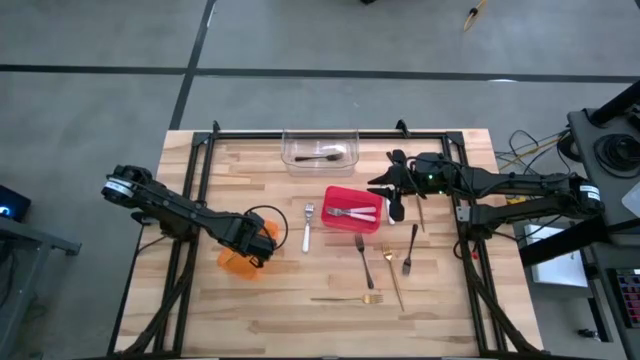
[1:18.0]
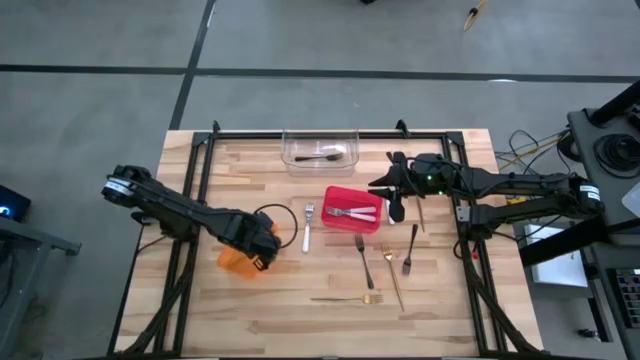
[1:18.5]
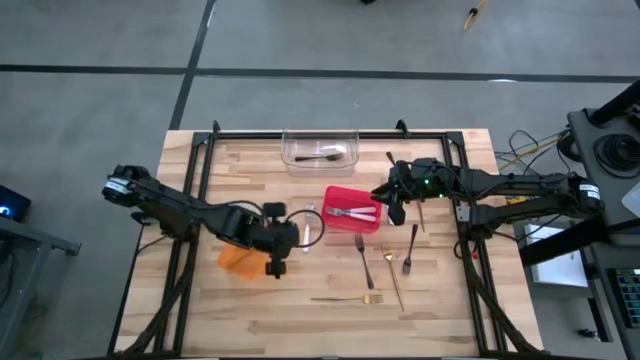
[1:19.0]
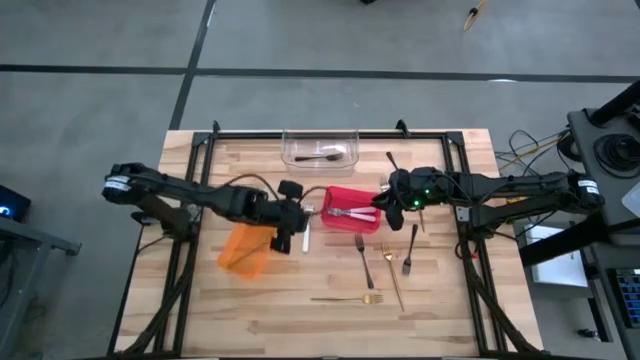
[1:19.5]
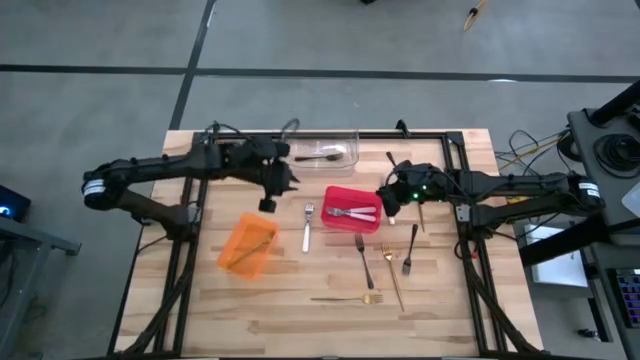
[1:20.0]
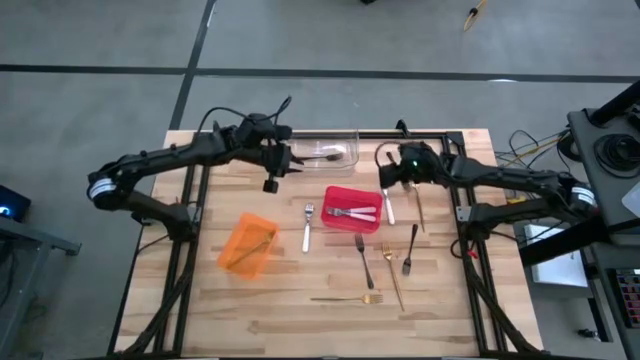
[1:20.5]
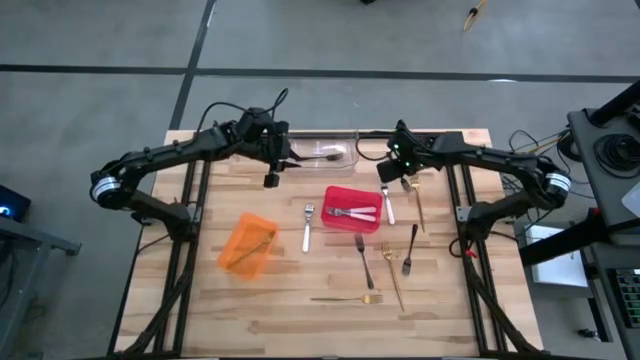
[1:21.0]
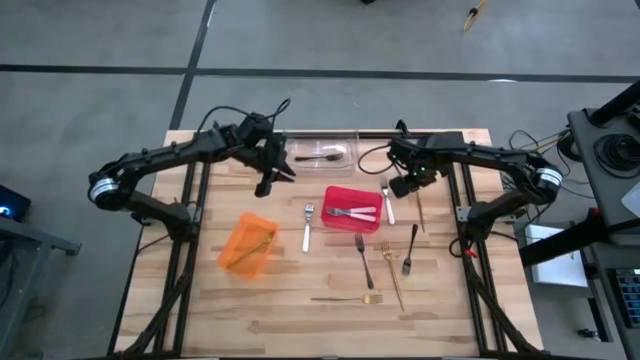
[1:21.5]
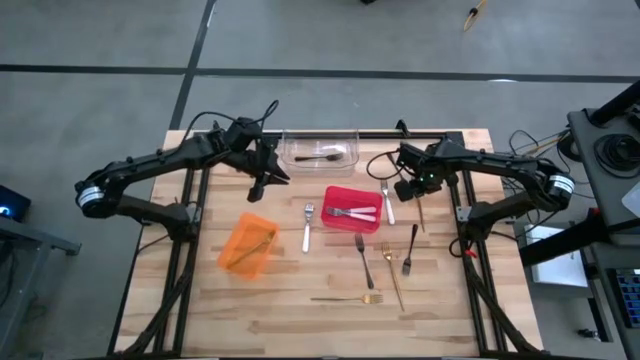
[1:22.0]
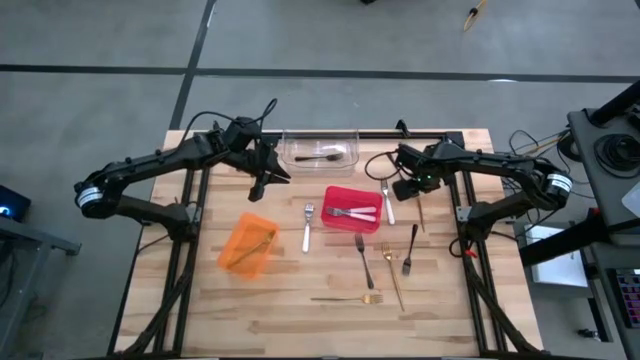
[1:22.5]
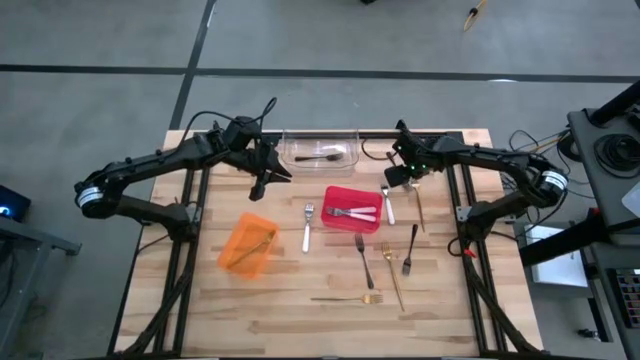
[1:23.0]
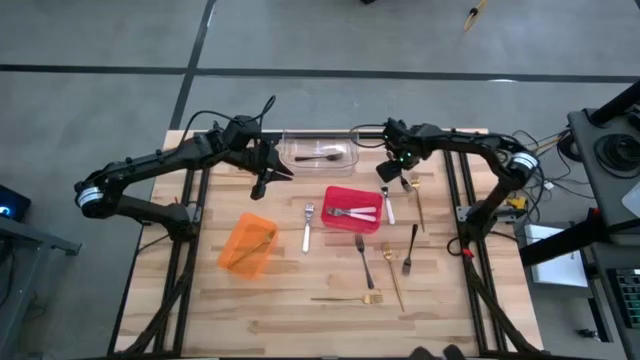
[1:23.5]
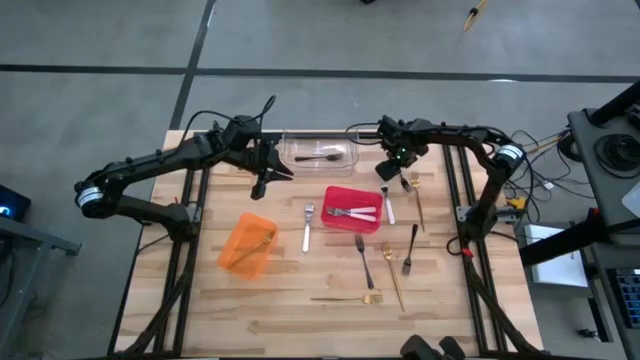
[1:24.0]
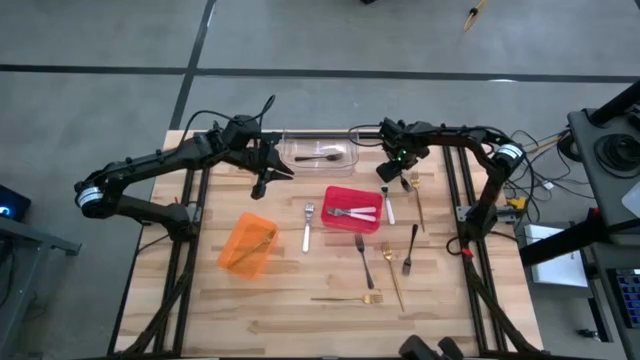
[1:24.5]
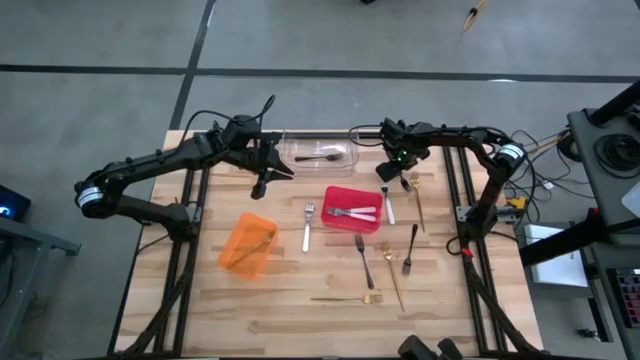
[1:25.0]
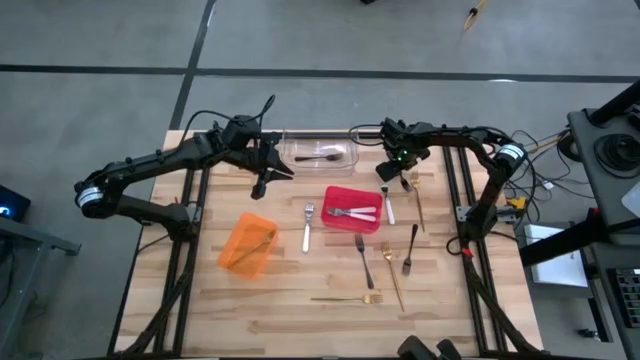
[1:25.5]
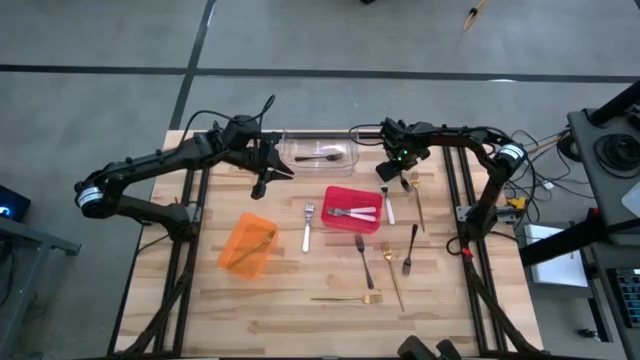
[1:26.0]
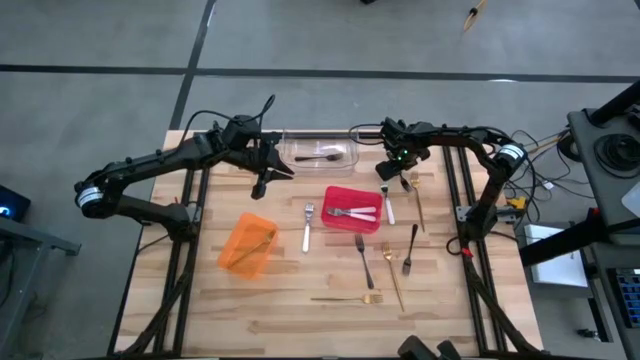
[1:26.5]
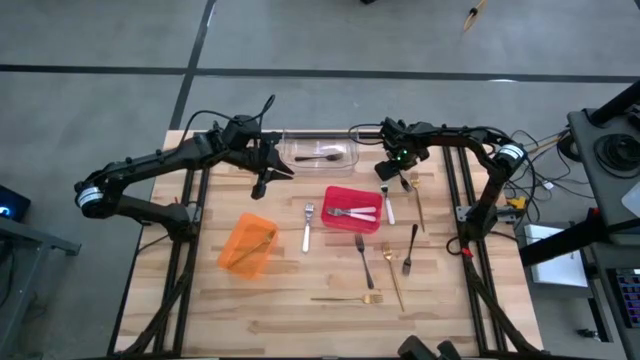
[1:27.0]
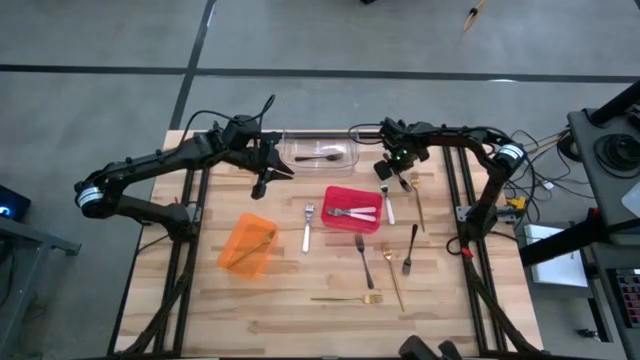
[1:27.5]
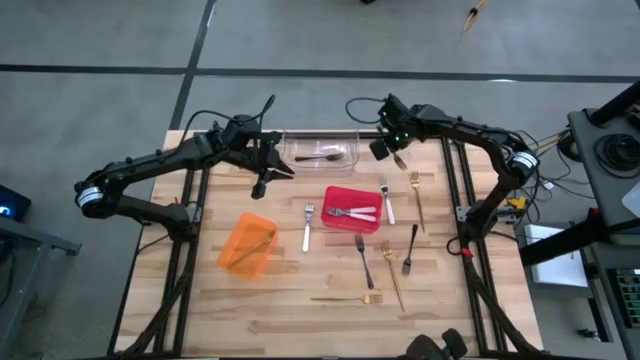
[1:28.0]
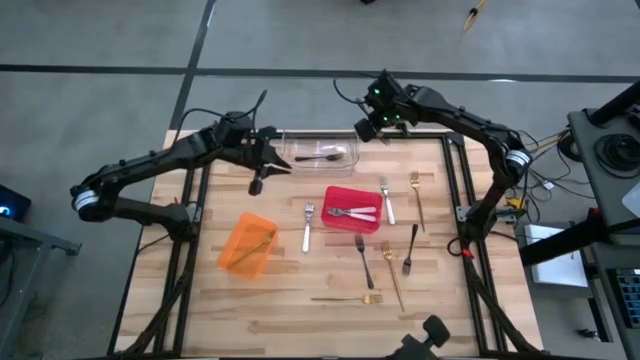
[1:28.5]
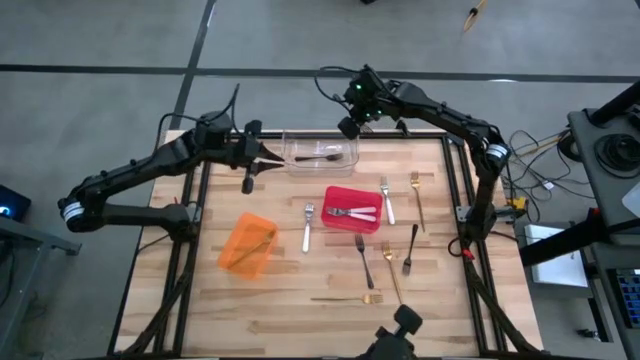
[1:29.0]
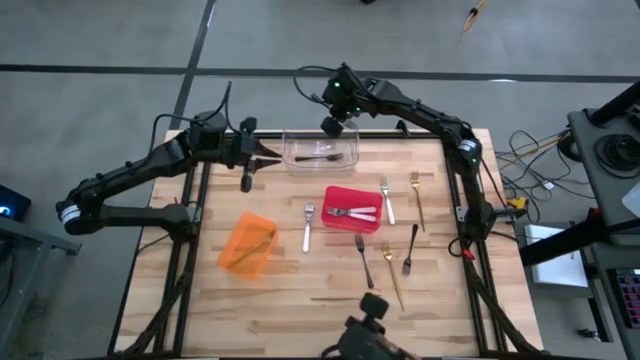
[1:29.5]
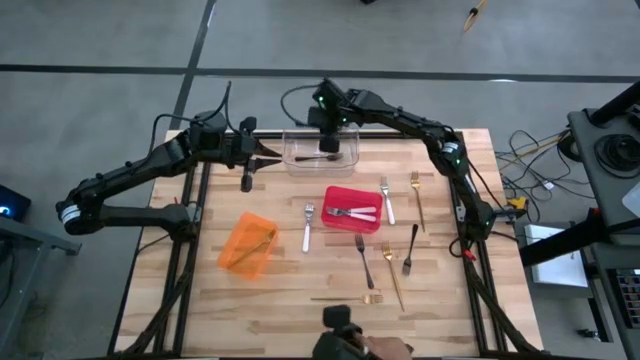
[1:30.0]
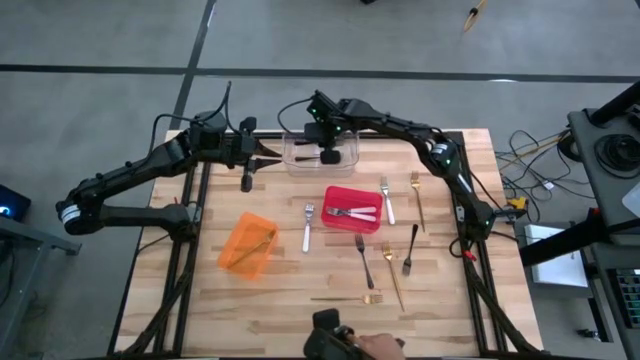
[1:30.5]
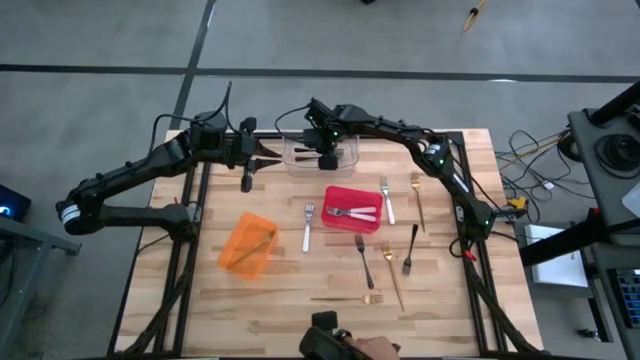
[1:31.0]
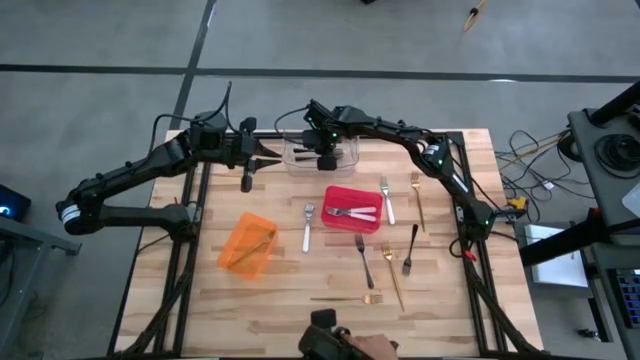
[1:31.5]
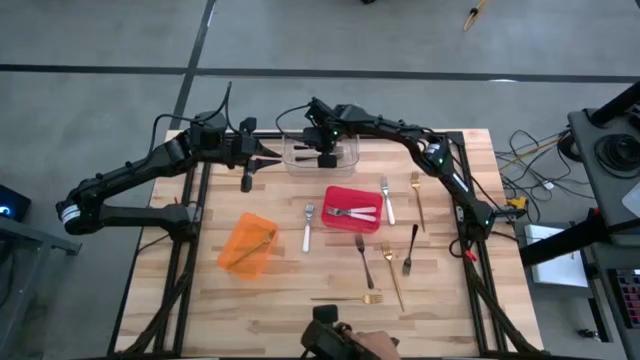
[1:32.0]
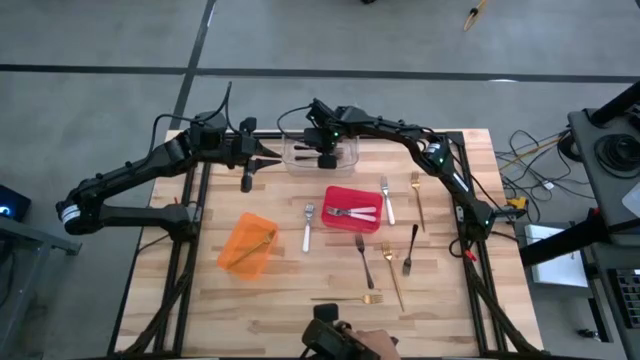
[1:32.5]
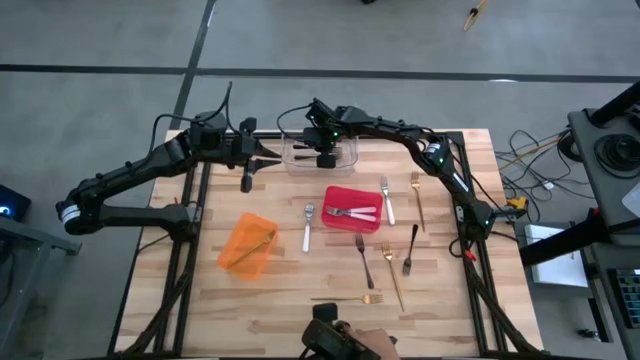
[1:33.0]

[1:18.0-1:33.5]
Task: Sort silverware by color (type)
Put the black fork into the transparent bin
